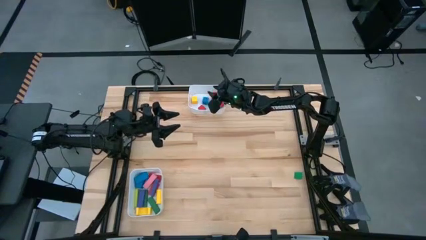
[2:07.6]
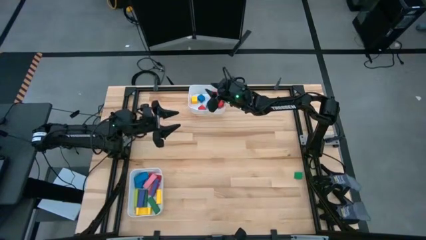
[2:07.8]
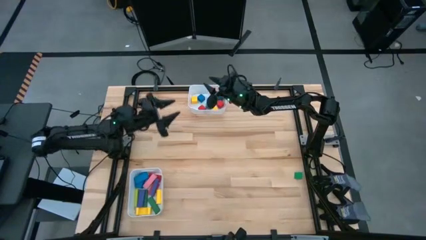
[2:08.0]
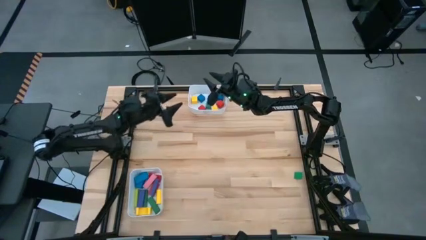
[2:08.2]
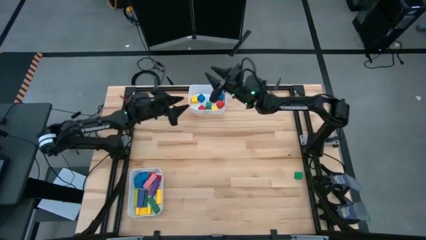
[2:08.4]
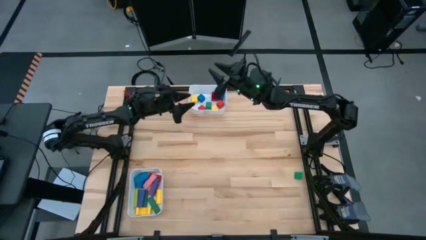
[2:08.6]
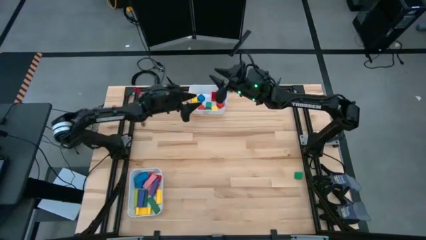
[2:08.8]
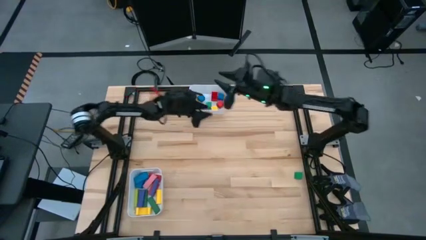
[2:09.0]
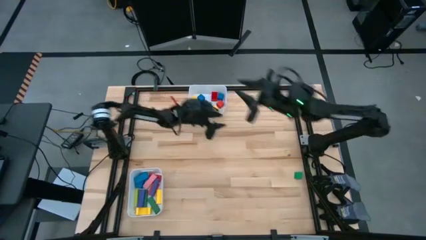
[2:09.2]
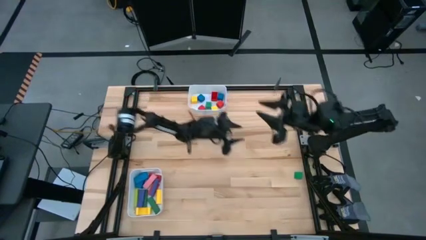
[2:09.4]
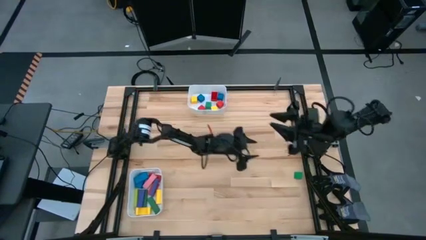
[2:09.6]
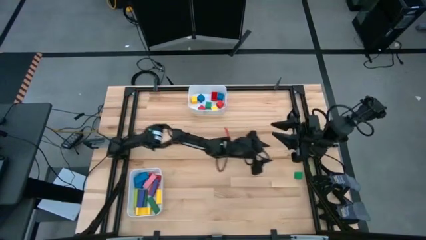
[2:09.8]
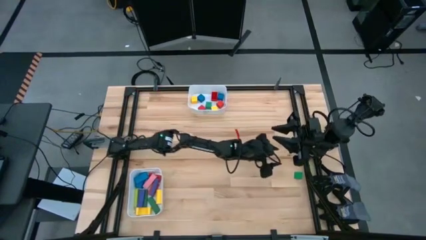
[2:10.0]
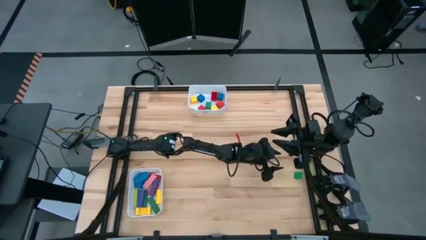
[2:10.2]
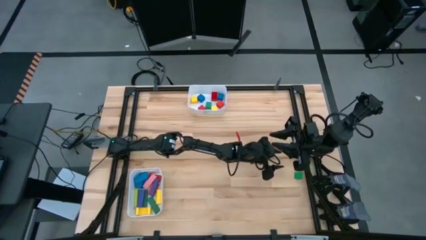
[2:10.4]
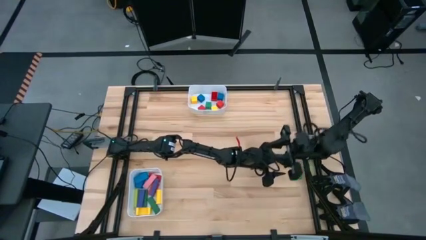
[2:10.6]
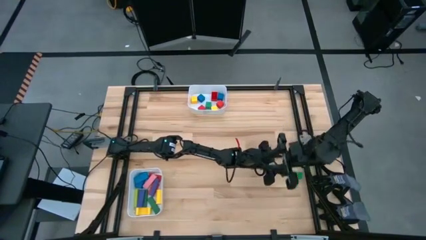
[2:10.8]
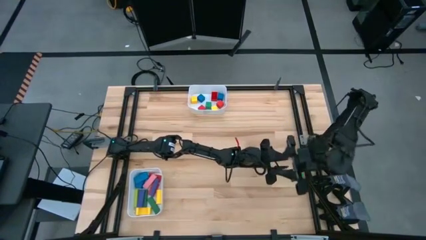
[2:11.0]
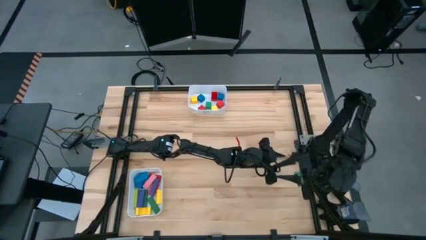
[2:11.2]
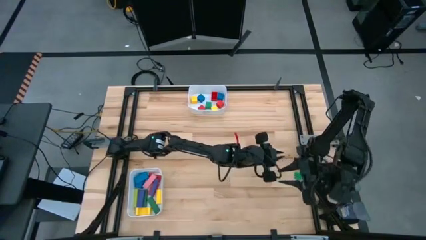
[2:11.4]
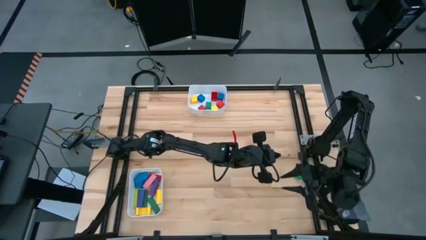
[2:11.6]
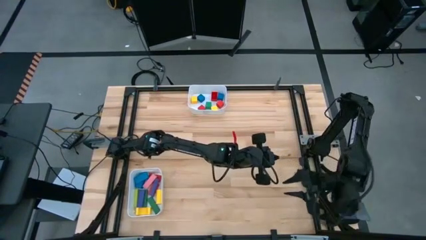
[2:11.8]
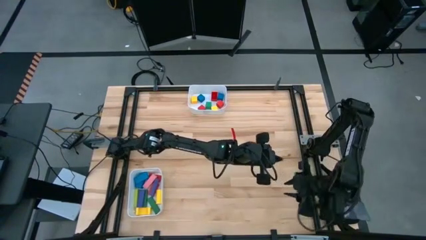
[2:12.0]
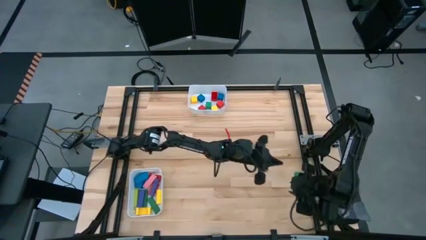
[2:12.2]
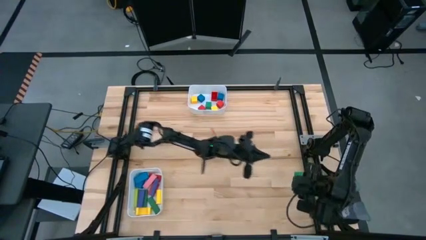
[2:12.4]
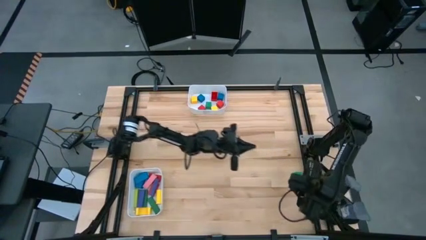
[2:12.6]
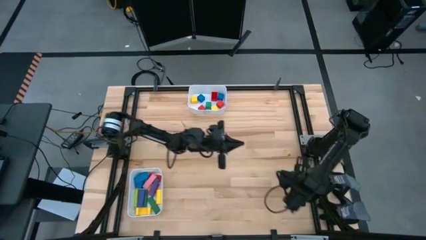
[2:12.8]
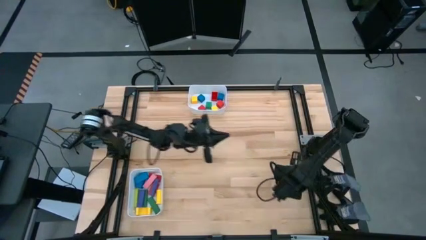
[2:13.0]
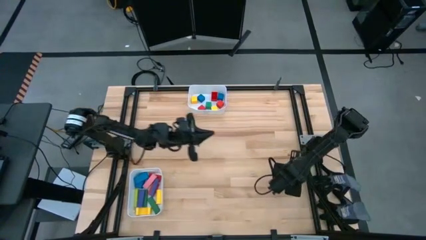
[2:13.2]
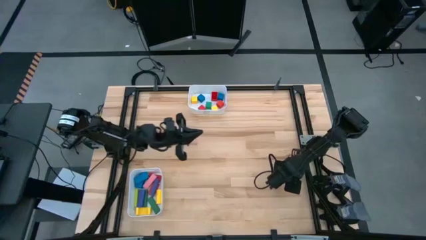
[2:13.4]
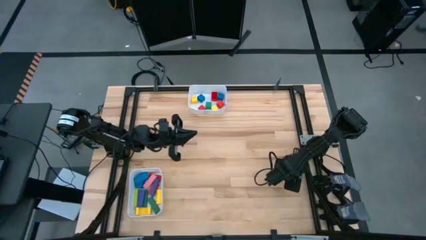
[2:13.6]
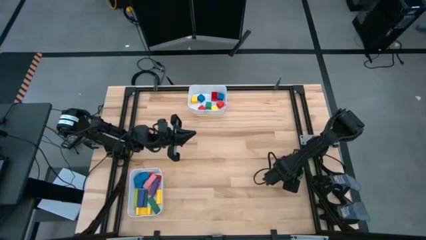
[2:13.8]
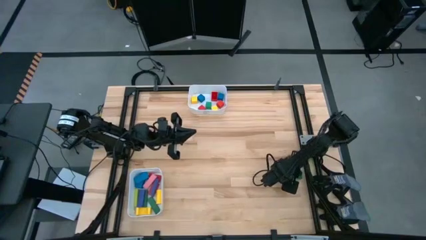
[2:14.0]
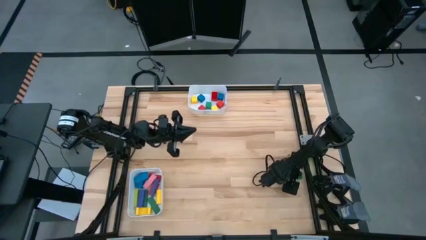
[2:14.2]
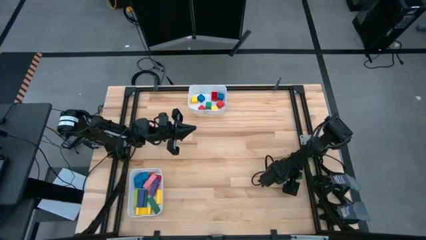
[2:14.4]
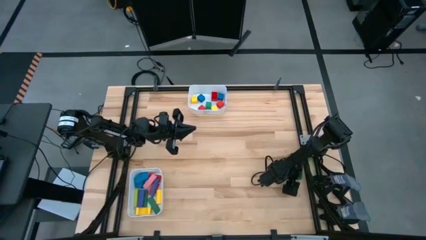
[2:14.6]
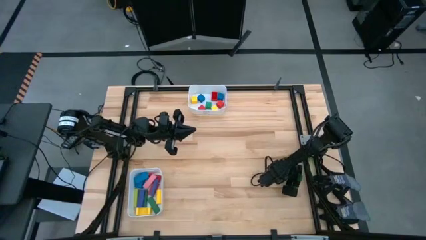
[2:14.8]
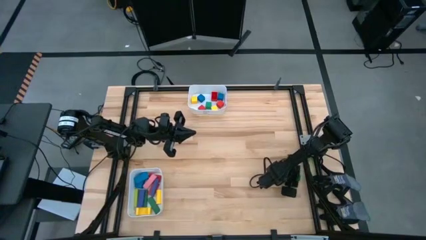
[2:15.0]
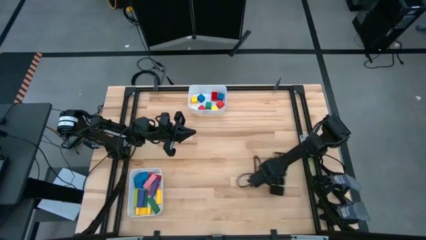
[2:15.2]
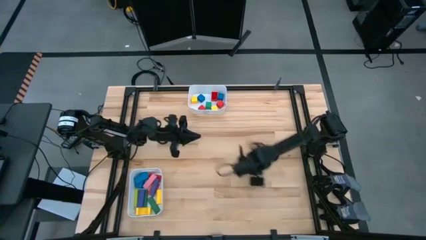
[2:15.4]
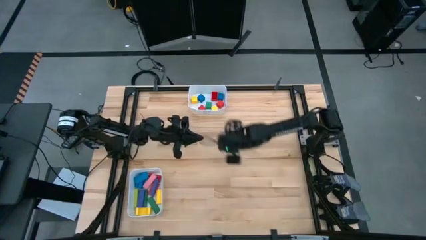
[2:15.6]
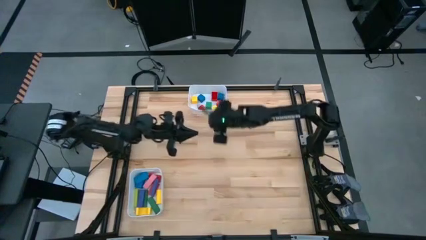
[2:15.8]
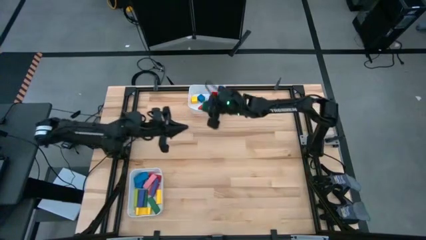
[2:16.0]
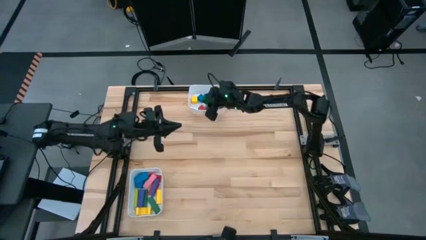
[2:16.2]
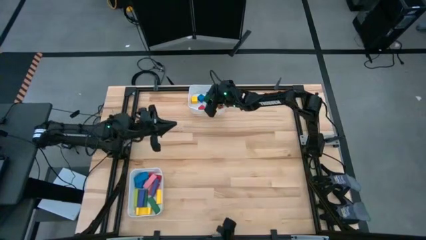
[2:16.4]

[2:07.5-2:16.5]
Task: Sort blocks by size
Put the green triangle block into the top white bin

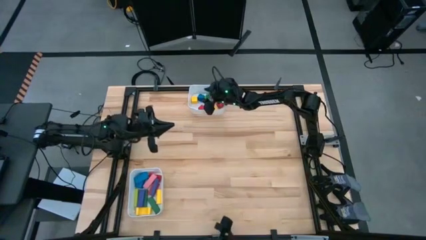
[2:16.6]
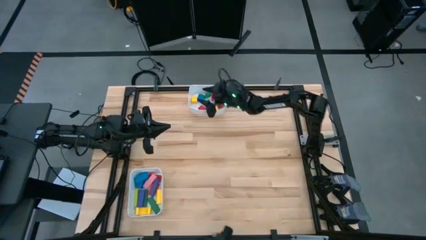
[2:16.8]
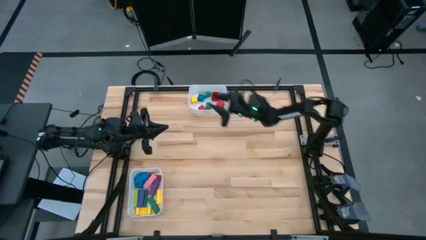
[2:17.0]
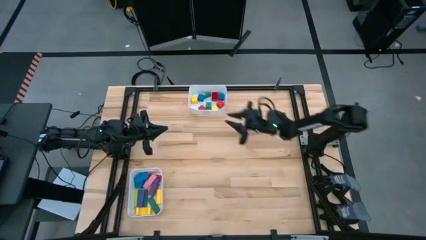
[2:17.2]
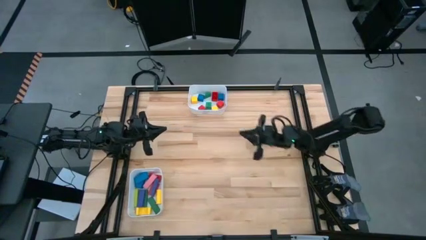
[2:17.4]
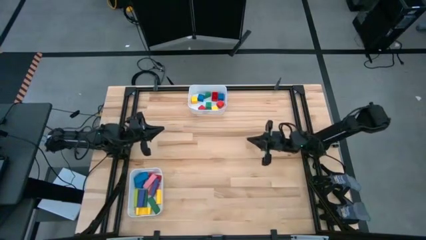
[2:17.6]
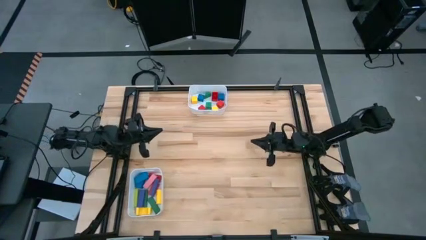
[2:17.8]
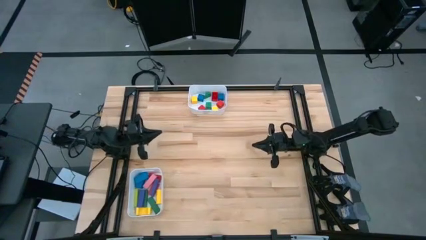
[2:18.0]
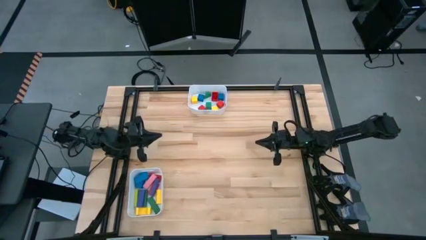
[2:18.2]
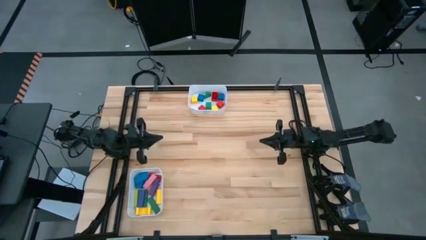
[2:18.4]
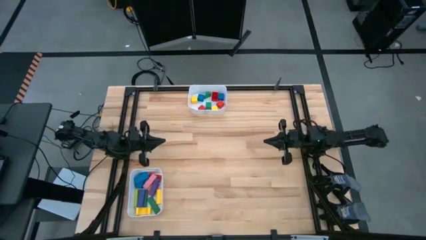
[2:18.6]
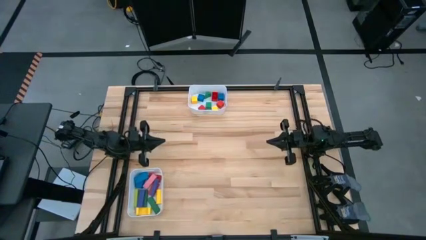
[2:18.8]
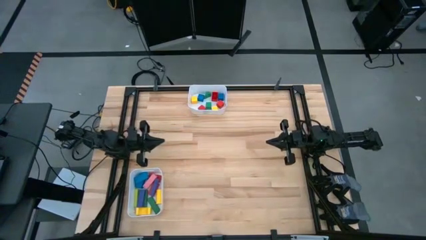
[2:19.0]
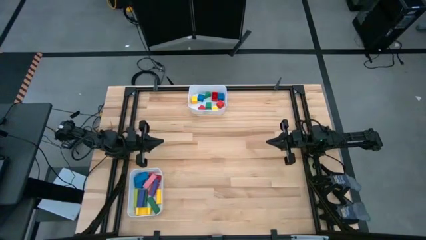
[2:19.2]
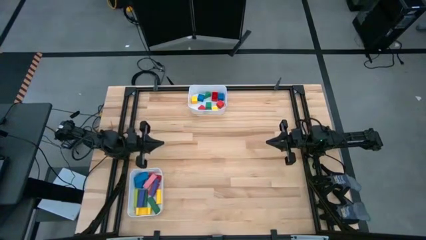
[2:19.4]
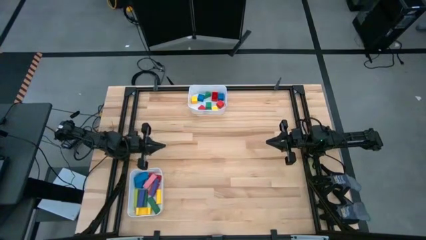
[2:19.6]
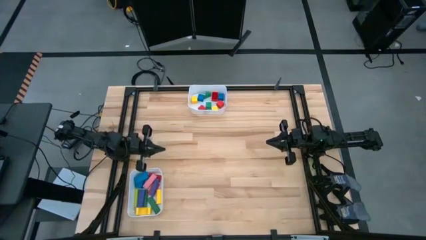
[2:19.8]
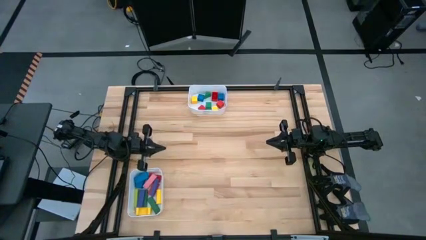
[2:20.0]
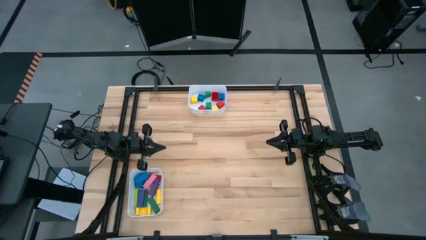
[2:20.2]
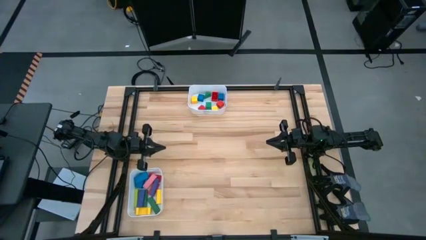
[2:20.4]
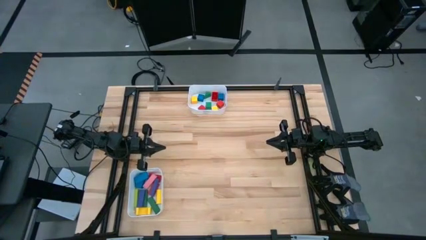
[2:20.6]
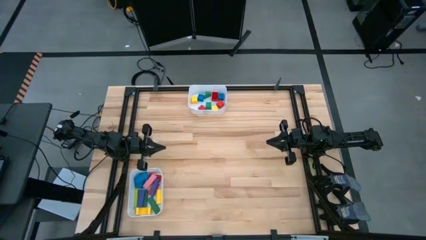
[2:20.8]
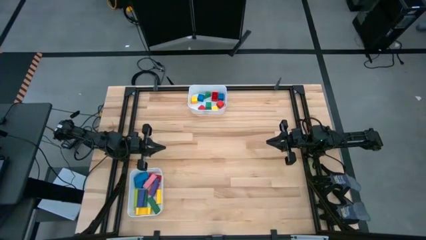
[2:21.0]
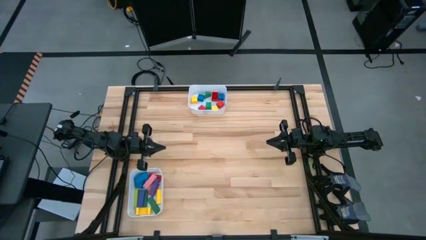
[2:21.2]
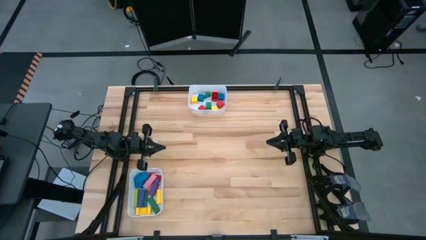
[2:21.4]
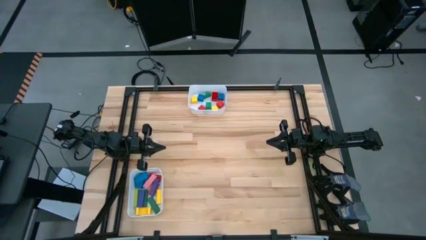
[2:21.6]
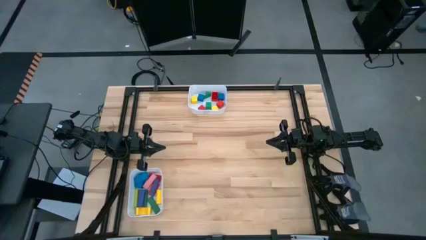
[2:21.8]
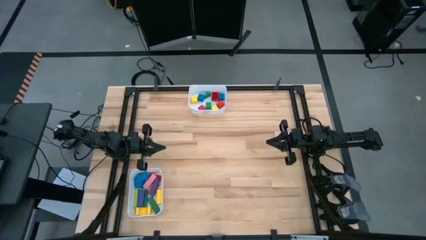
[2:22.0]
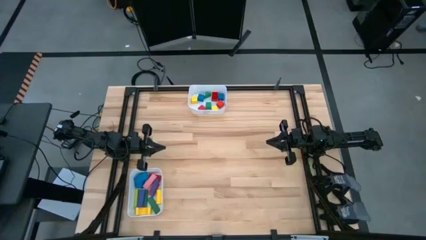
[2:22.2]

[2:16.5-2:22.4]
Return to Home Position

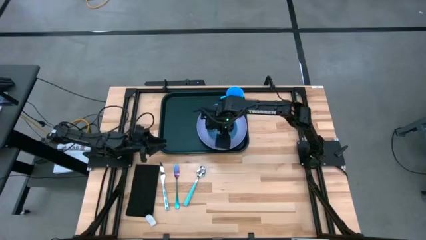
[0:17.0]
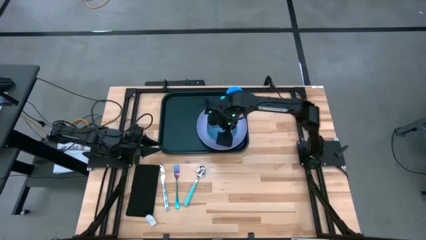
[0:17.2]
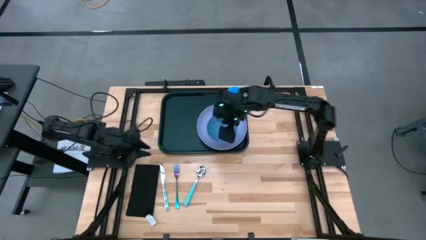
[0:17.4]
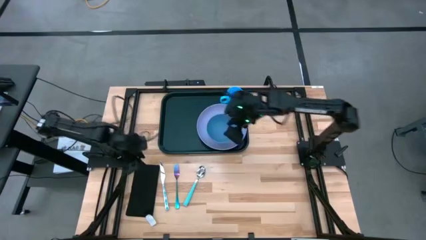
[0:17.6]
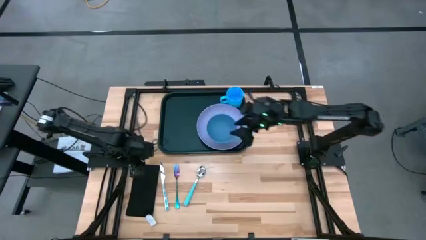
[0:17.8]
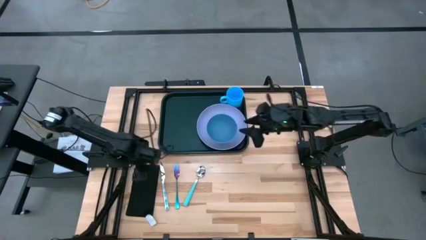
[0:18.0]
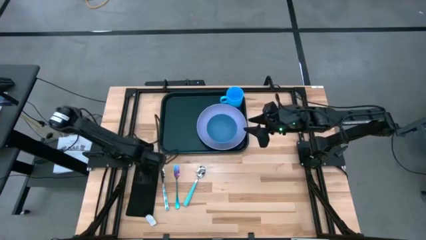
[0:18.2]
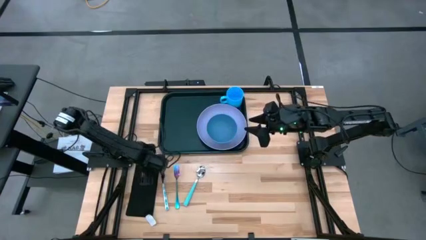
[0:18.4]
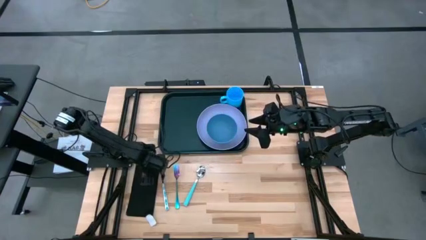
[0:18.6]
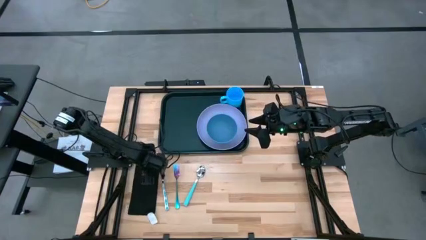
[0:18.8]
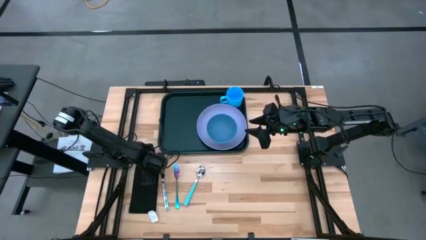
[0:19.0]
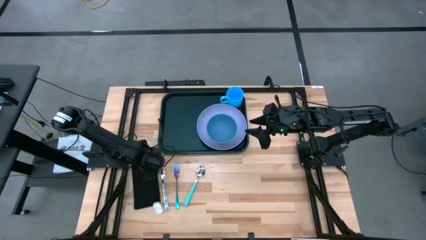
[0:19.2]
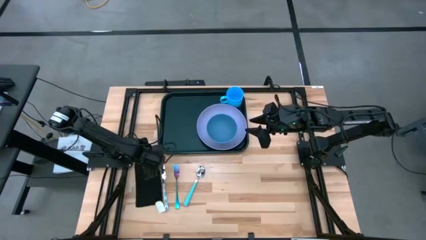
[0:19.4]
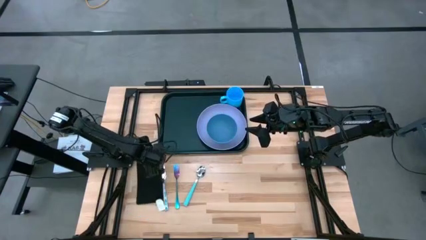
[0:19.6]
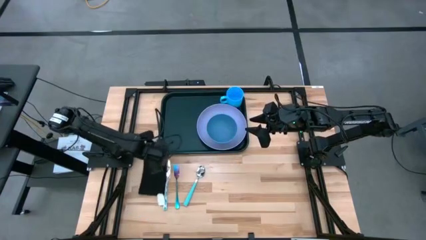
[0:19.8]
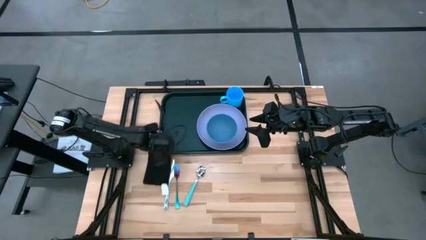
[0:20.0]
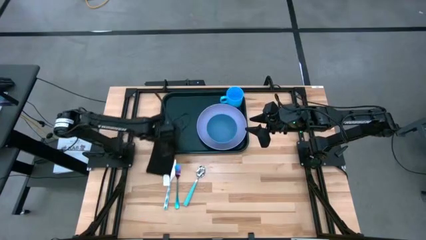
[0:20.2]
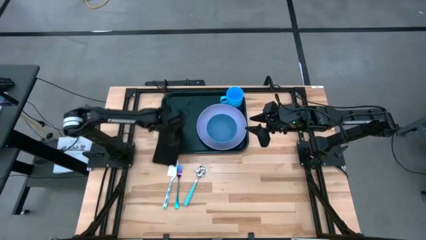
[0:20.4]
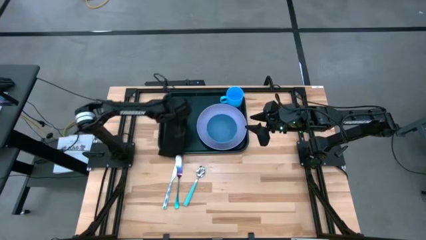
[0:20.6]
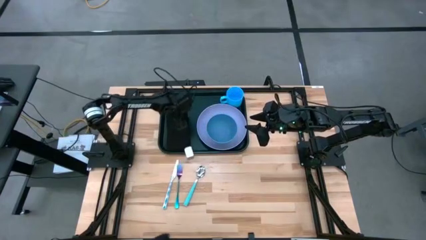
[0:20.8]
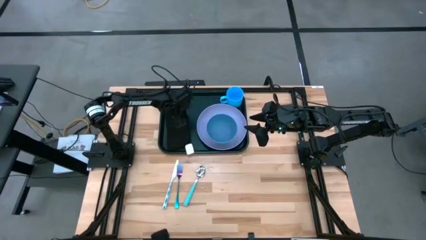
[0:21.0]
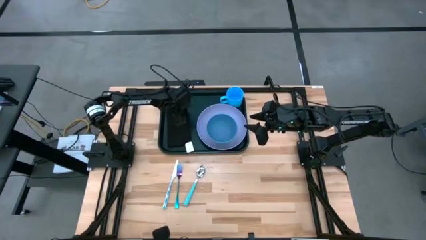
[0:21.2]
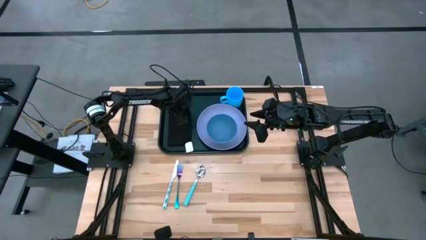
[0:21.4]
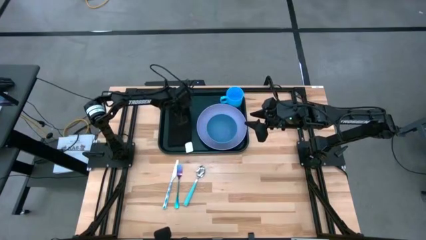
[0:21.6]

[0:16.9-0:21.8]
Task: Set up tray
Put the black napkin on the black tray to the left of the purple plate
